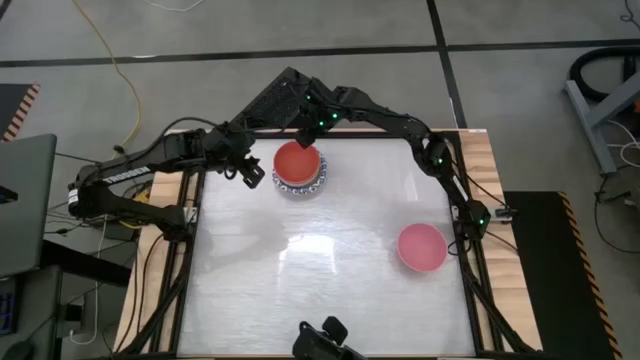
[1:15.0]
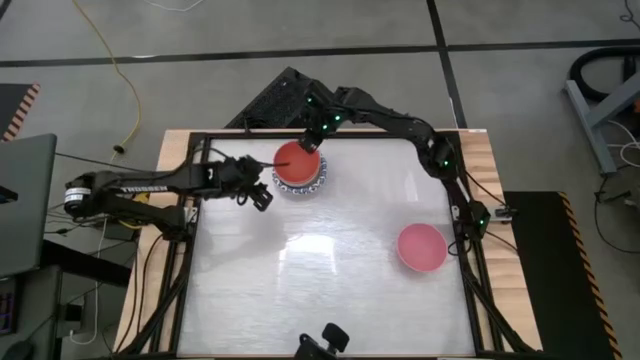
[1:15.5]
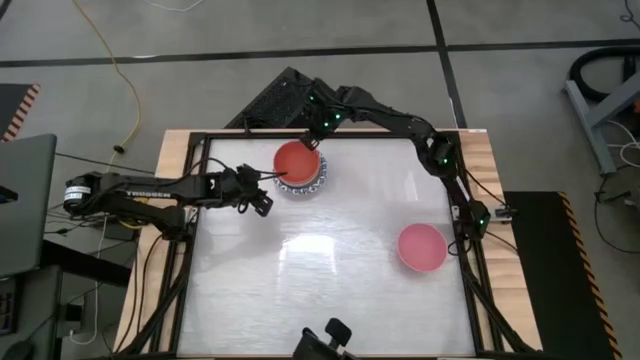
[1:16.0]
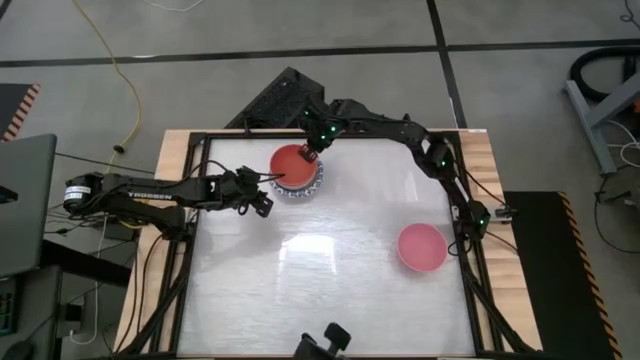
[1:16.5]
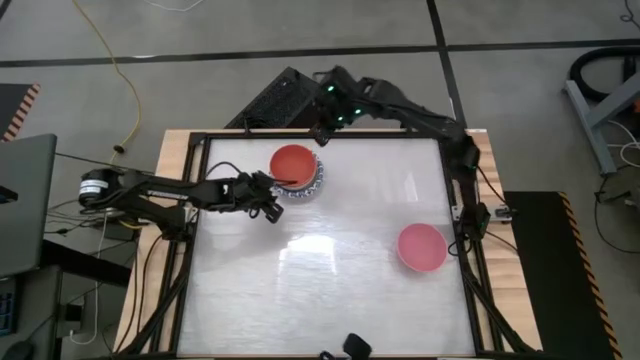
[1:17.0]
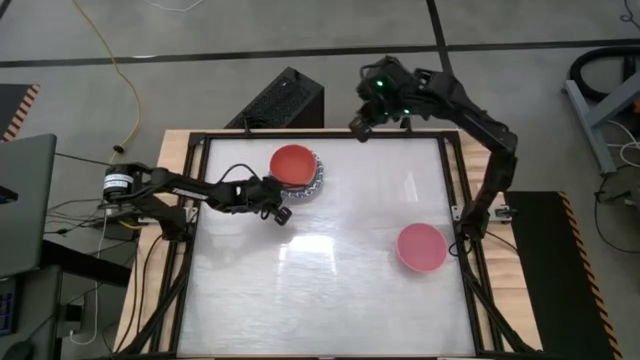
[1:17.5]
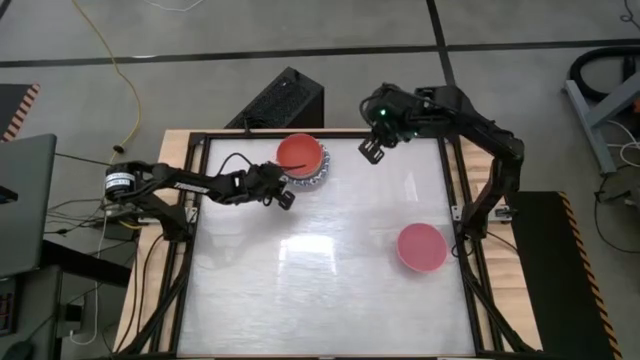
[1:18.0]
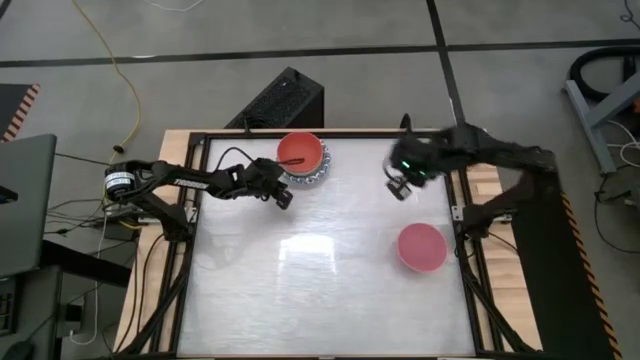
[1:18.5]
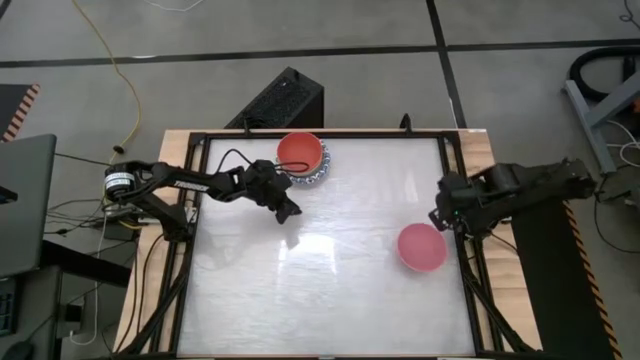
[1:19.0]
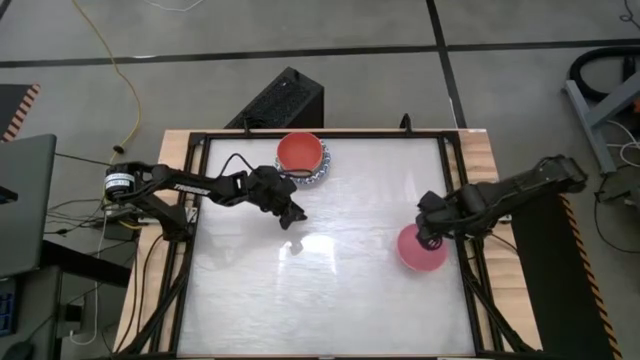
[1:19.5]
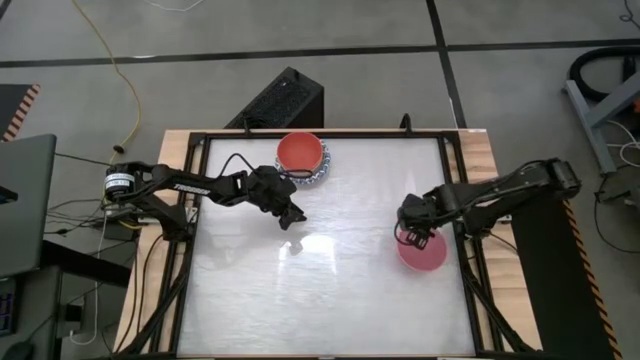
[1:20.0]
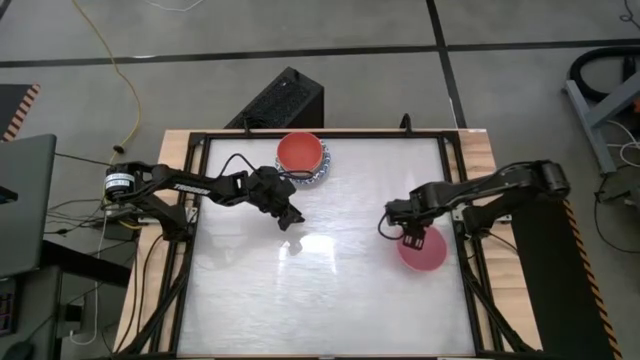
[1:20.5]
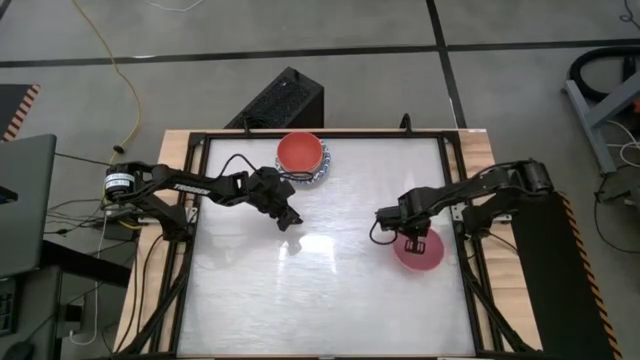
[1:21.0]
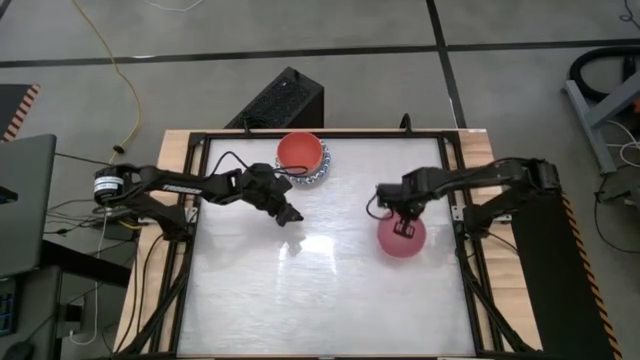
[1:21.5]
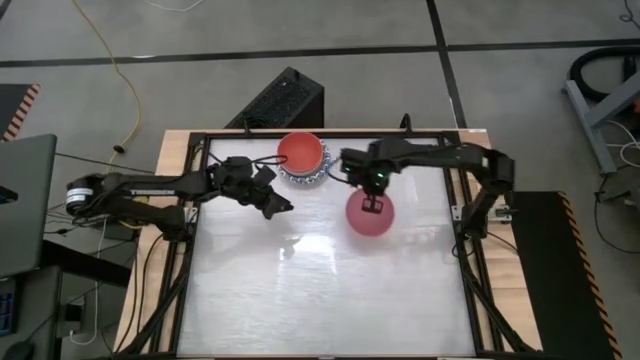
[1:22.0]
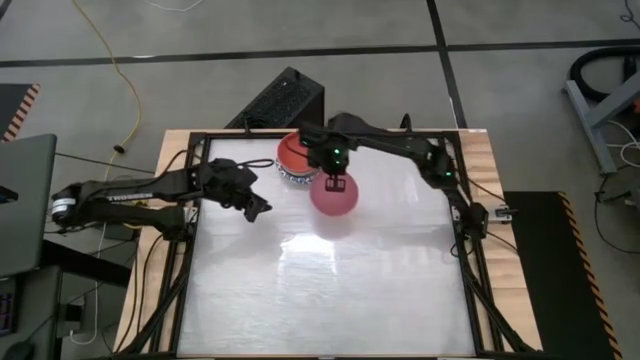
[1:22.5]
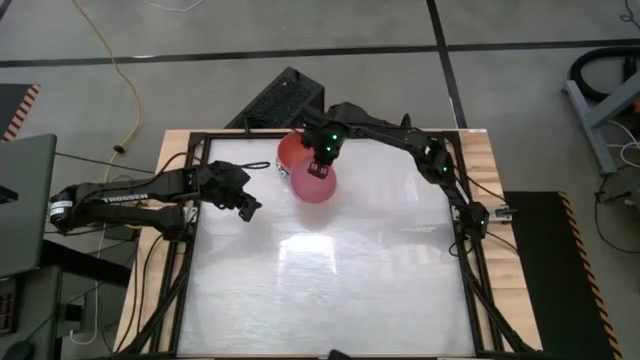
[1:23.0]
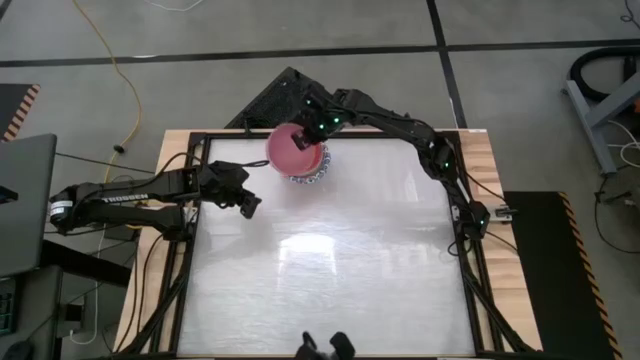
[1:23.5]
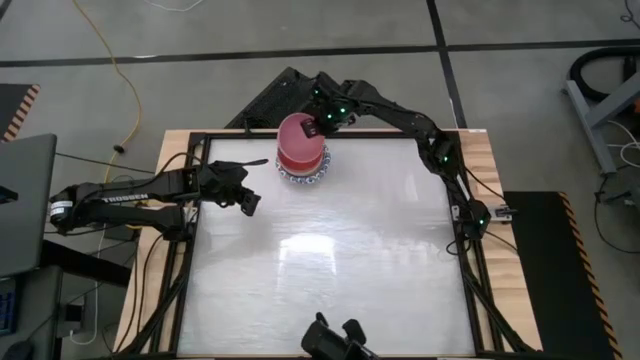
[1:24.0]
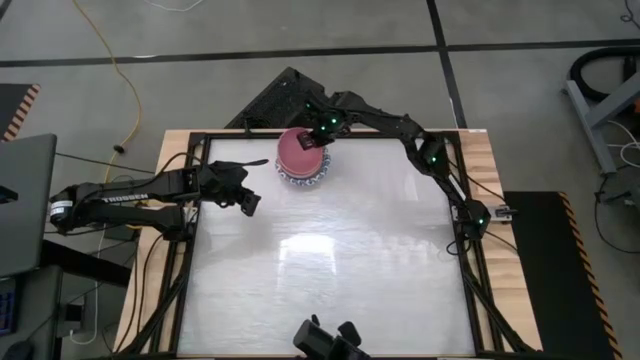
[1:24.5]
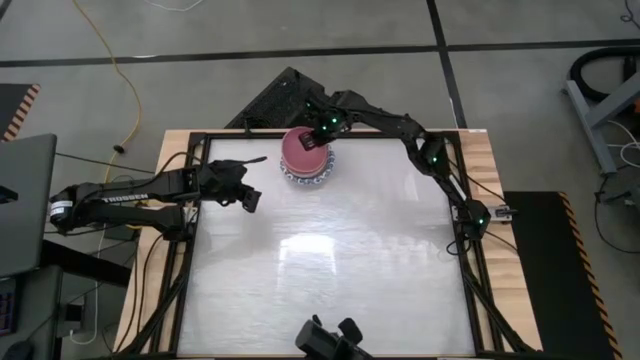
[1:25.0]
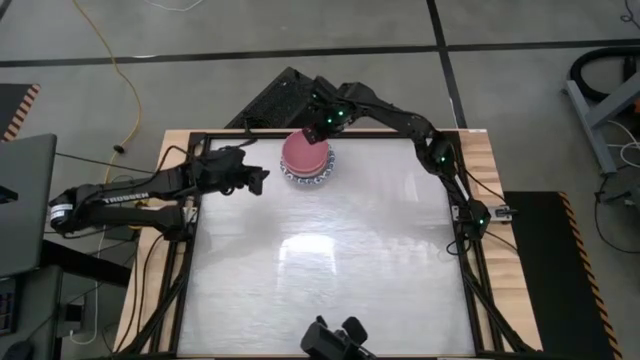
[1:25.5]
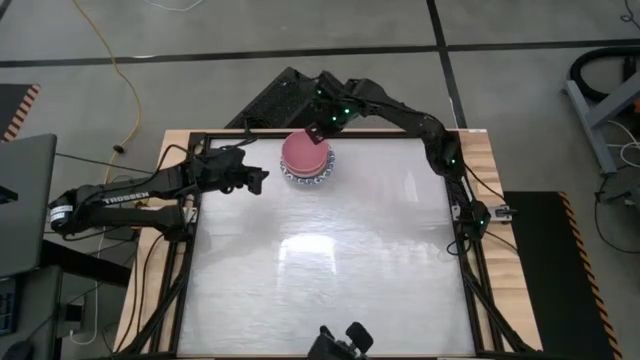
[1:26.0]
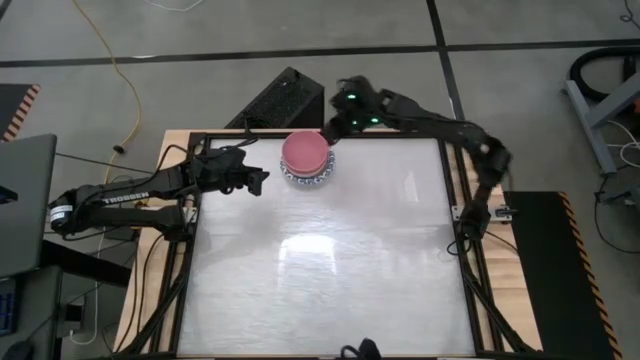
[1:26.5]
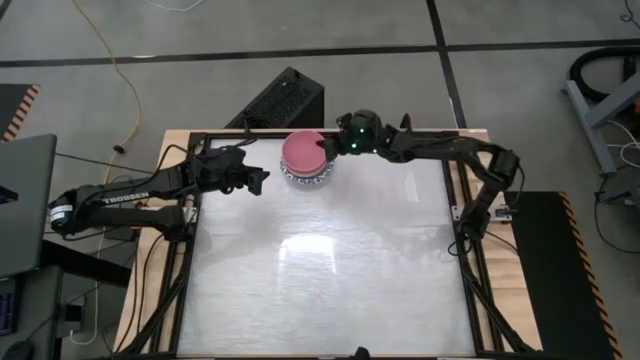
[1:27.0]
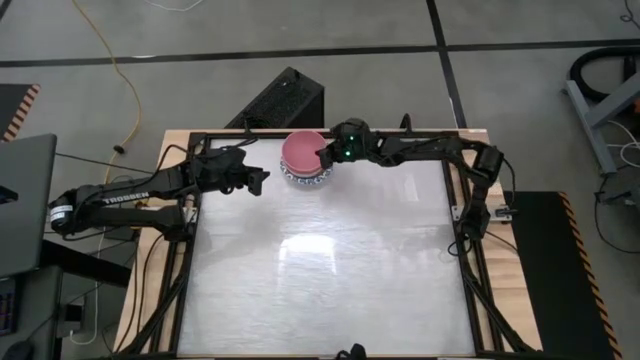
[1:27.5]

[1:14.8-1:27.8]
Stack the pink bowl on top of the orange bowl

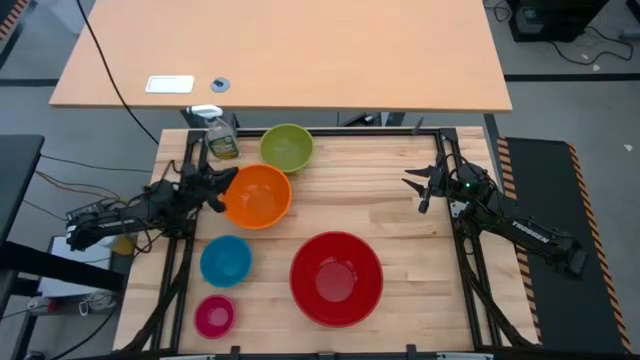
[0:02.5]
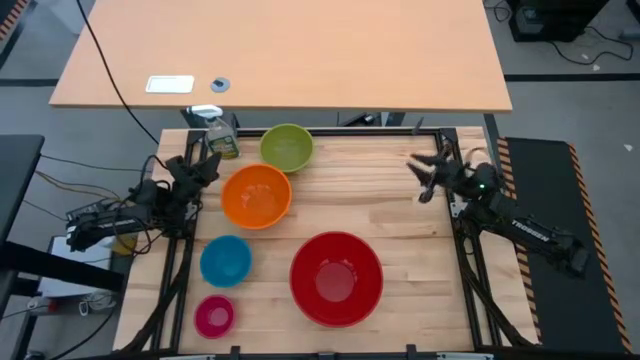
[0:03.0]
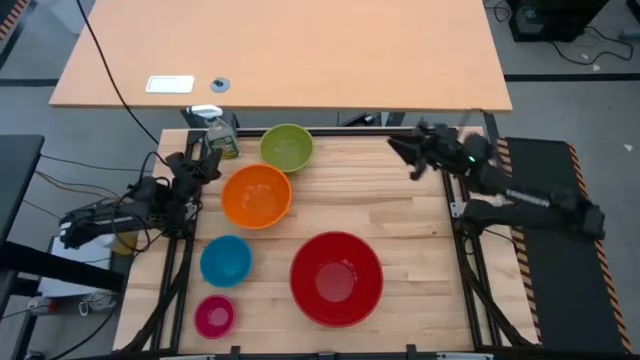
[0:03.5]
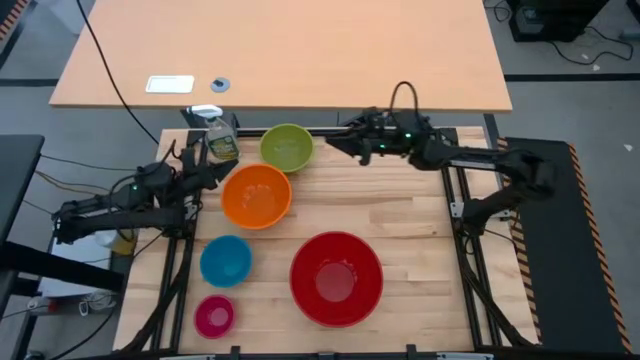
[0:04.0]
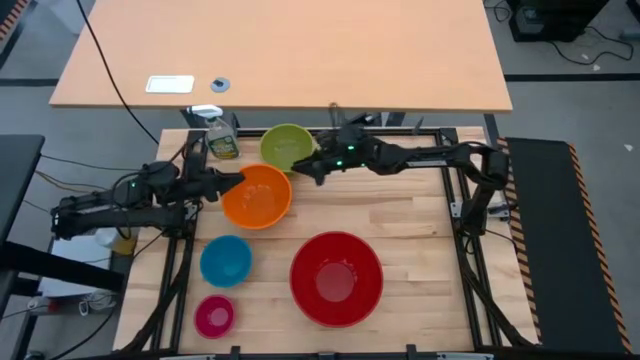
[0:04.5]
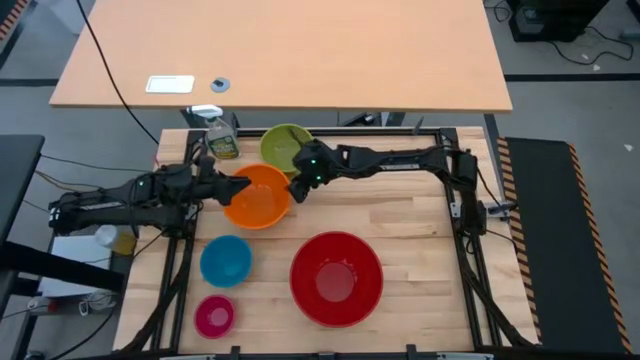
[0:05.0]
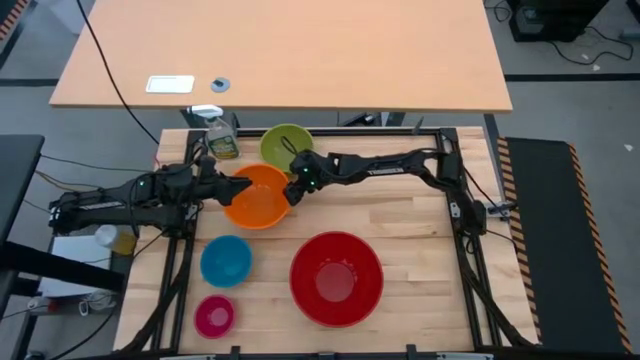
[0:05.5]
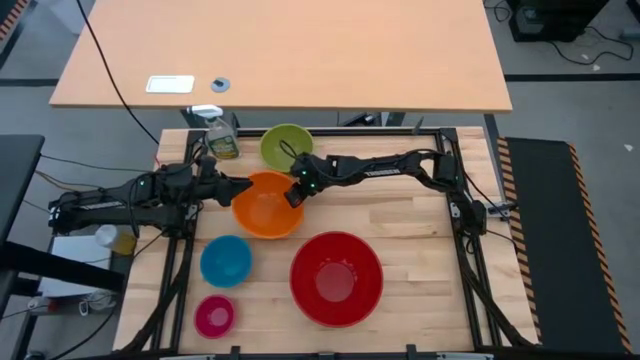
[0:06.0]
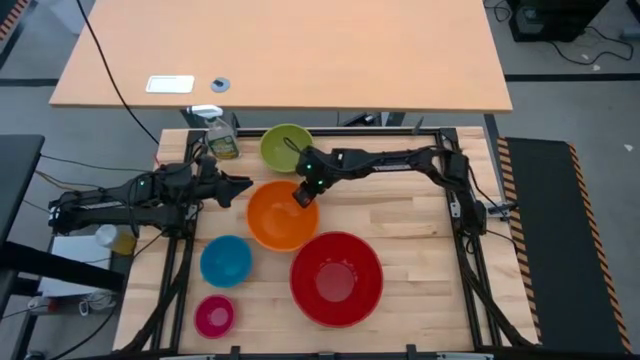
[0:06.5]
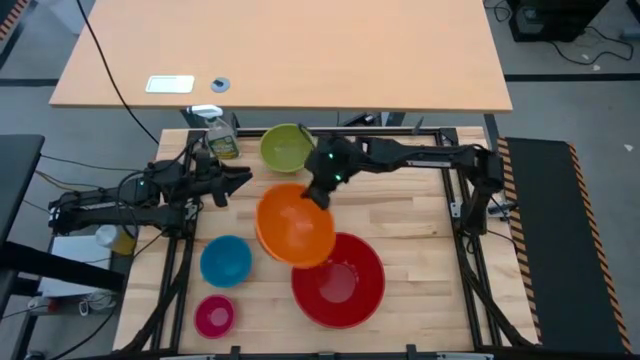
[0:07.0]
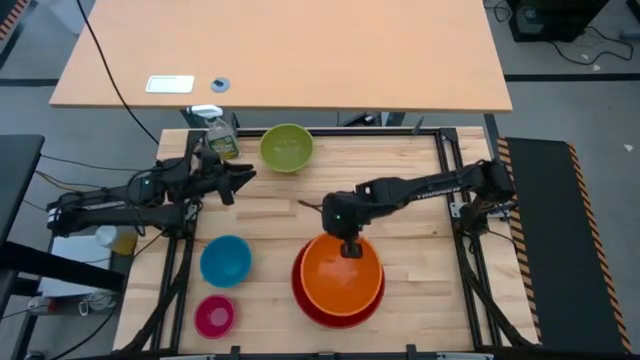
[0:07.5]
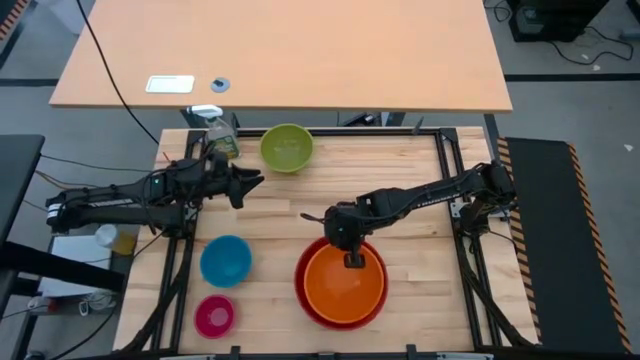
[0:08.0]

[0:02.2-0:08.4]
Stack the orange bowl on top of the red bowl

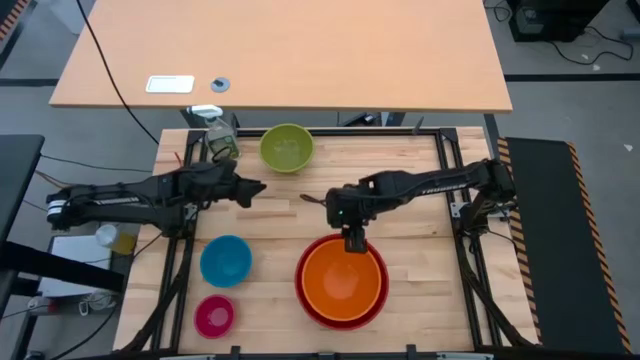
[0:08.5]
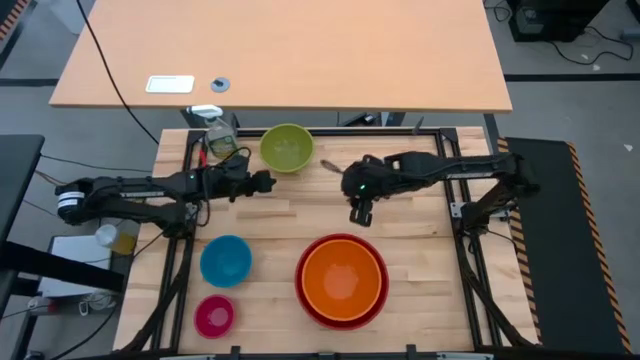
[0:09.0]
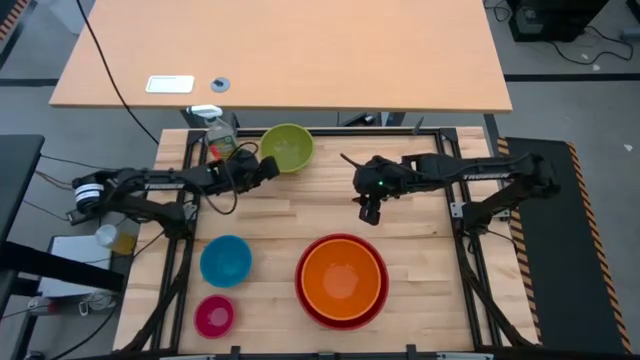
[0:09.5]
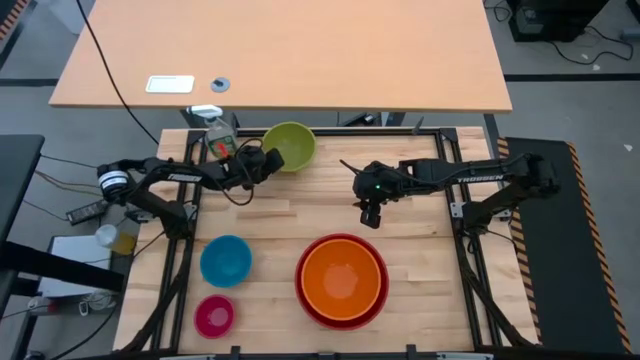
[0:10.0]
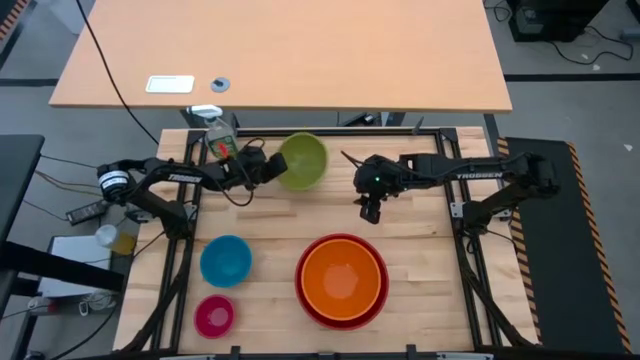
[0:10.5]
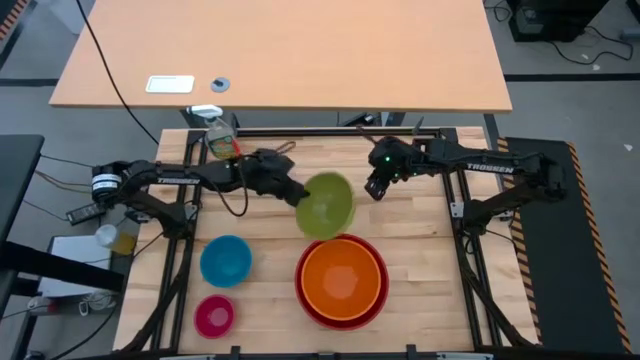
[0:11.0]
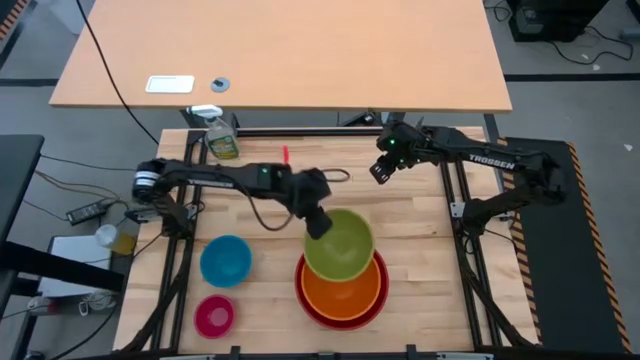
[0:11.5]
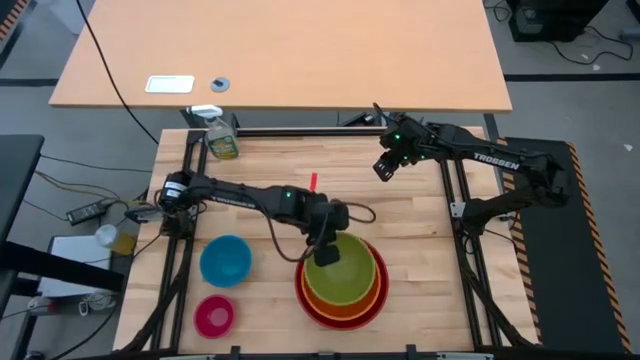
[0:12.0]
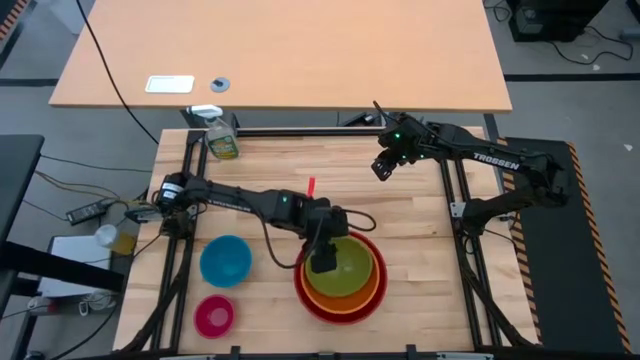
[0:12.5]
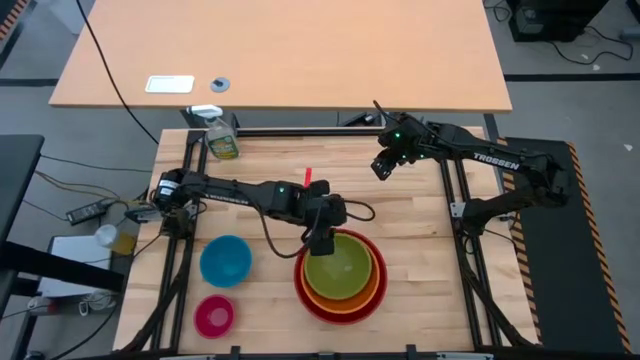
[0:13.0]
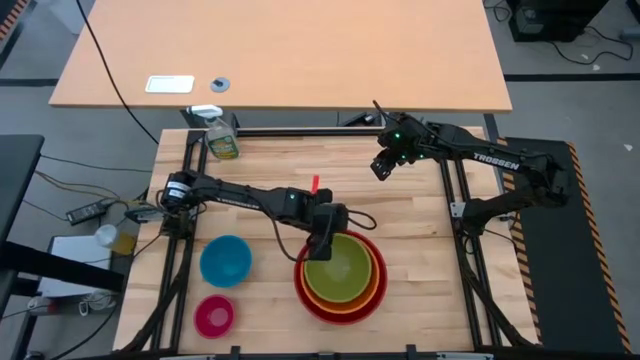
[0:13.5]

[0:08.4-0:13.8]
Stack the green bowl on top of the orange bowl
